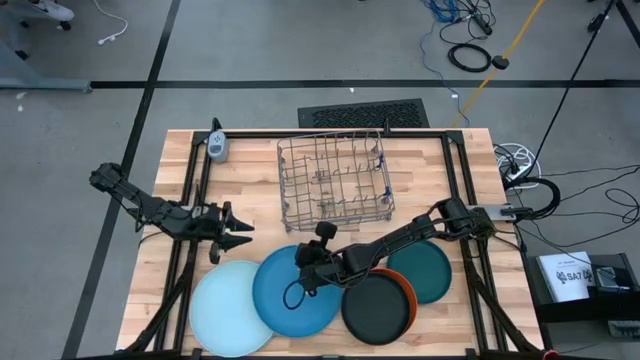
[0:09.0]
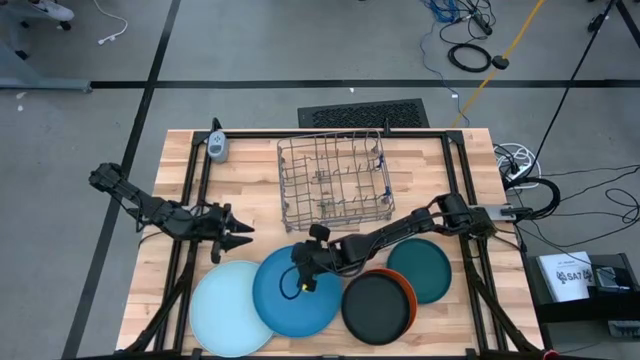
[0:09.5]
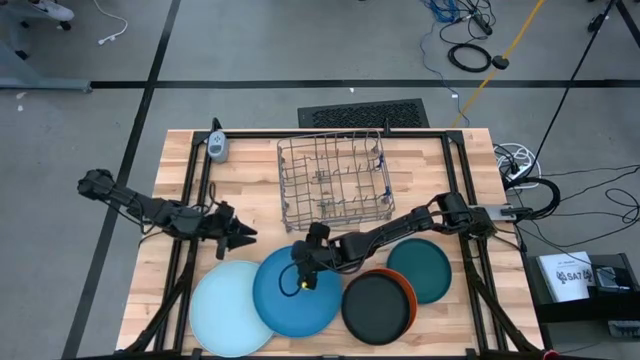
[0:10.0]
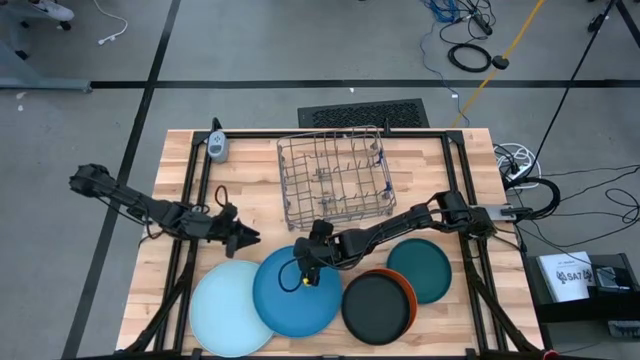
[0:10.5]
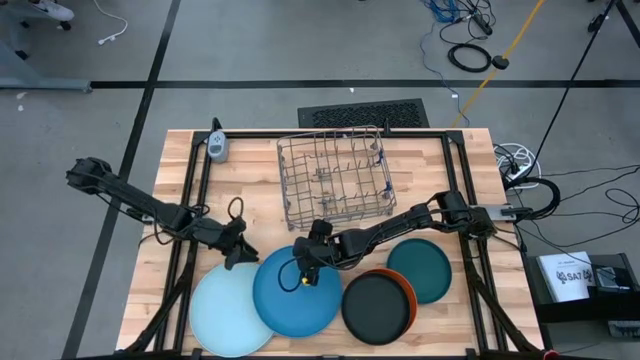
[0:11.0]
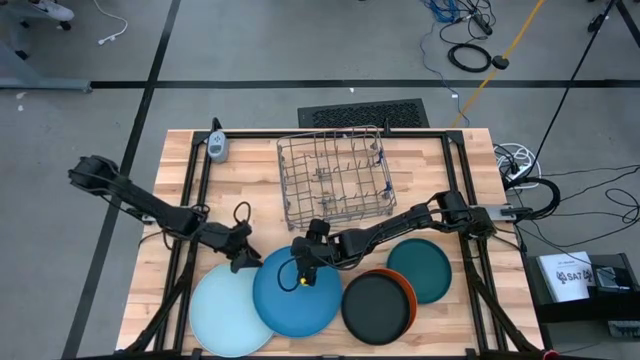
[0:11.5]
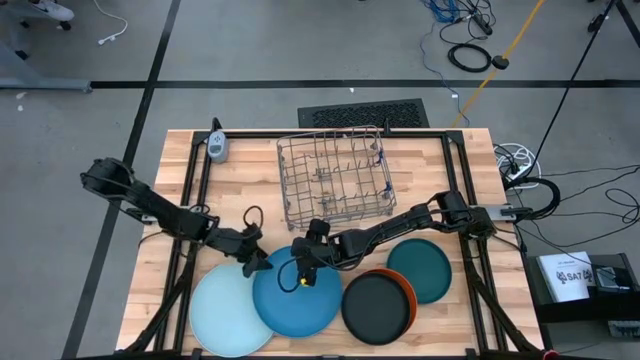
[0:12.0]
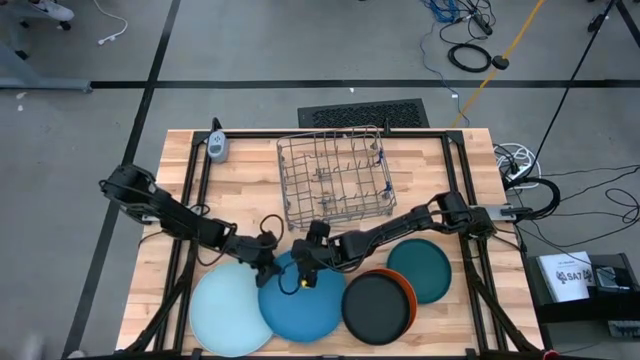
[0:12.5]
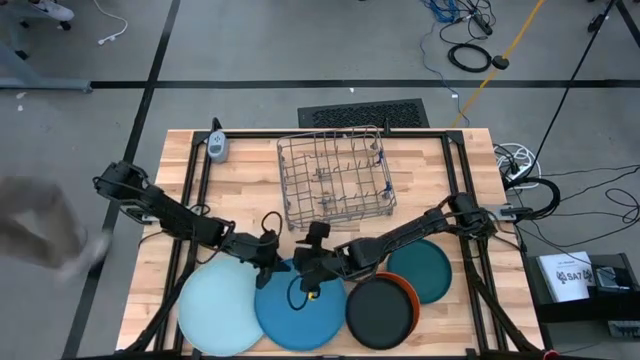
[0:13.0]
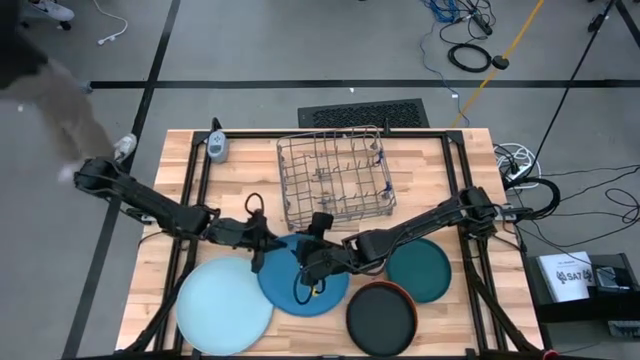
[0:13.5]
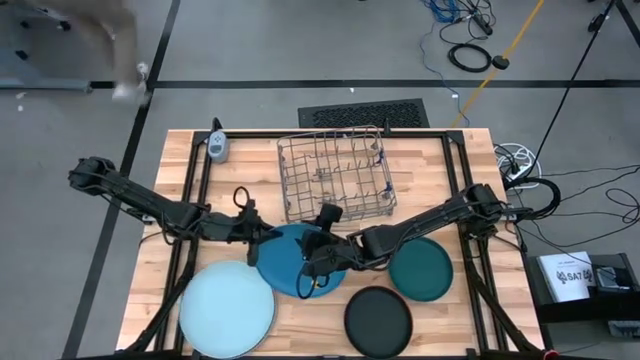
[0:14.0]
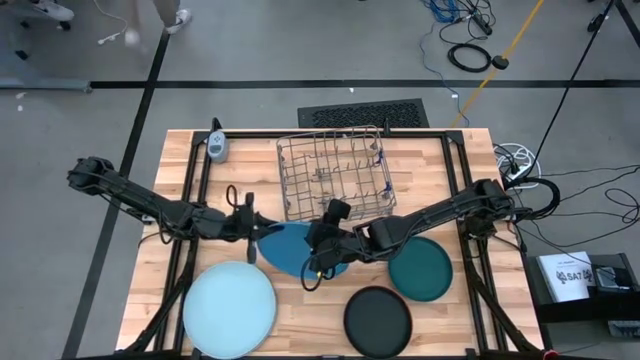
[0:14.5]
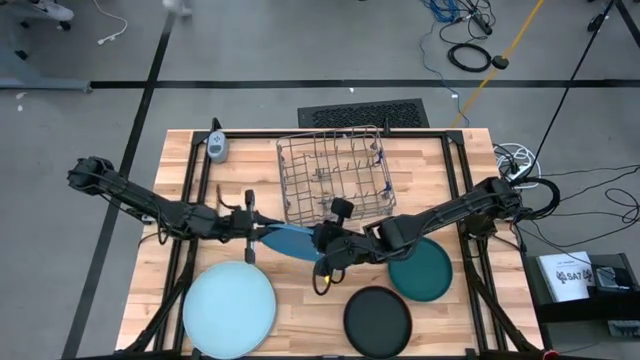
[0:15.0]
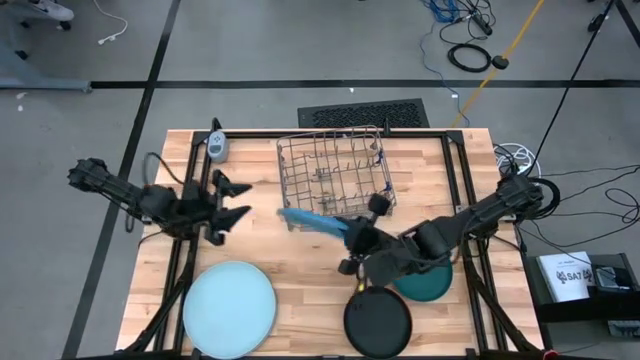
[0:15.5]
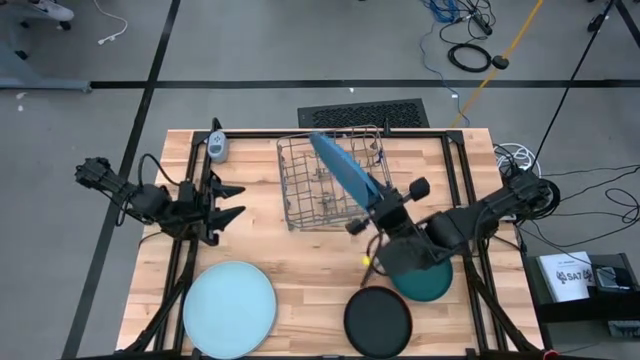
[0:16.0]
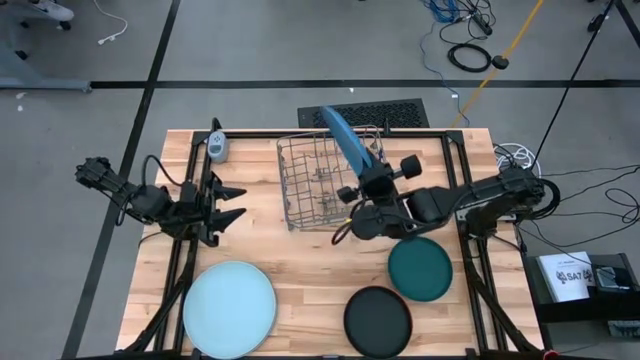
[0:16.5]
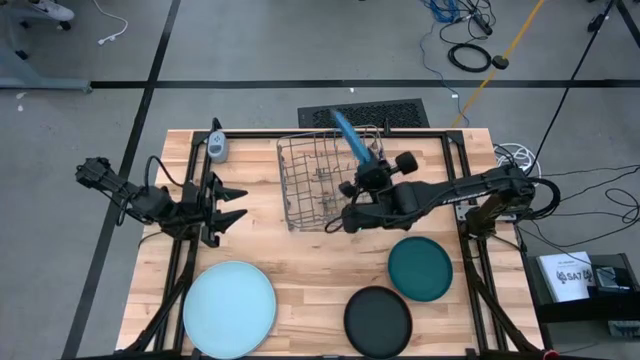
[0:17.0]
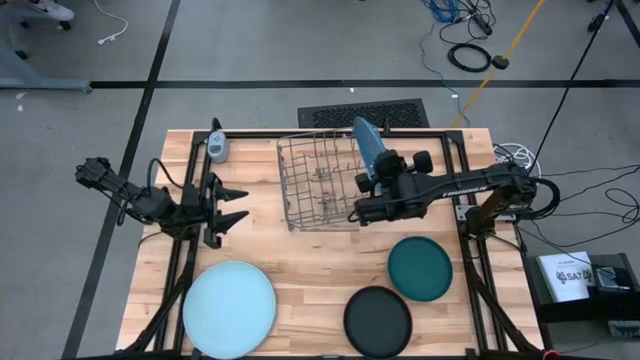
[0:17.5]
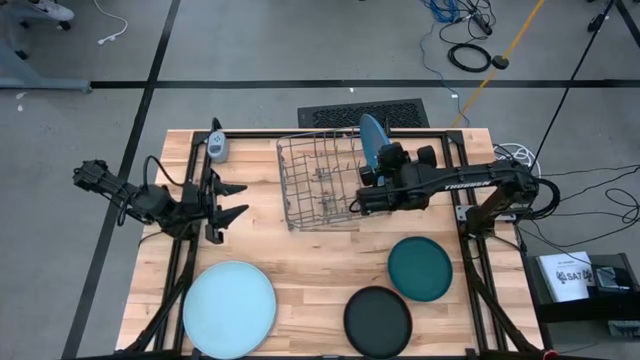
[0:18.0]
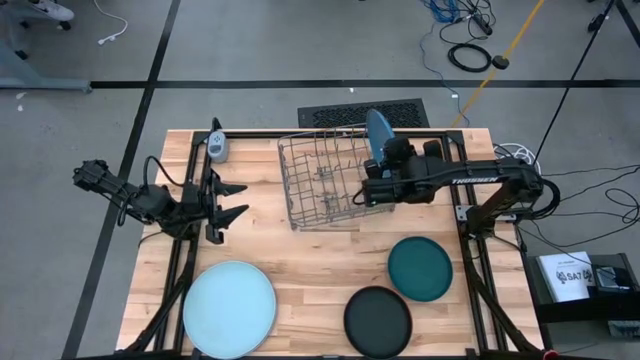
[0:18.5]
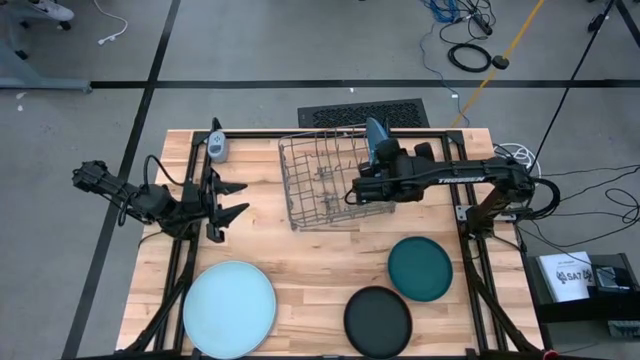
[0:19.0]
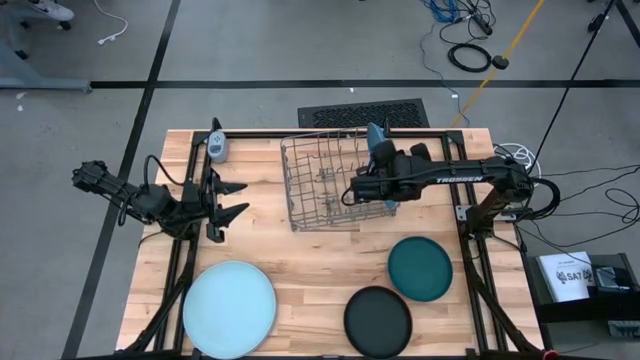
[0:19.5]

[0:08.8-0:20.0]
Task: Sort dishes
Put the blue plate in the dish rack

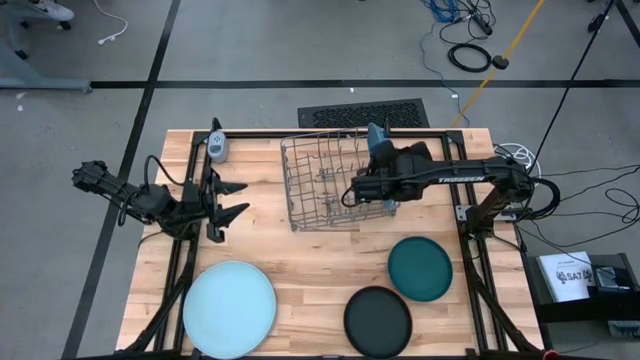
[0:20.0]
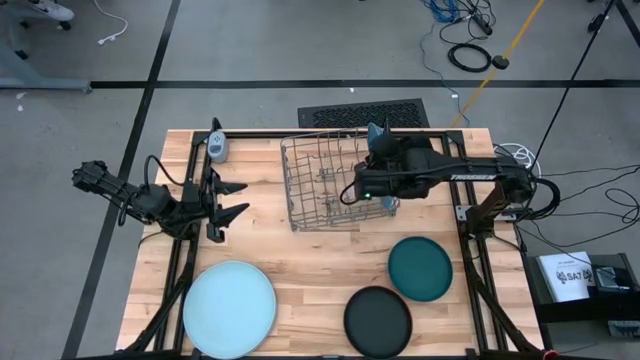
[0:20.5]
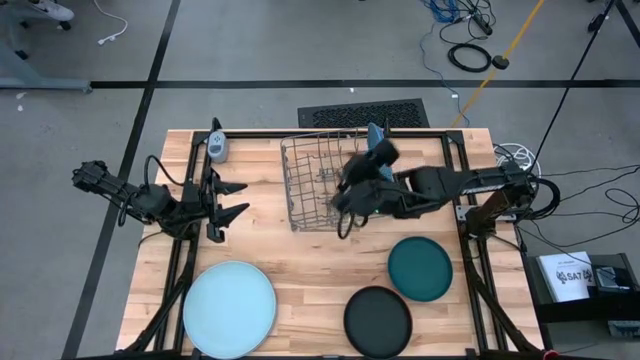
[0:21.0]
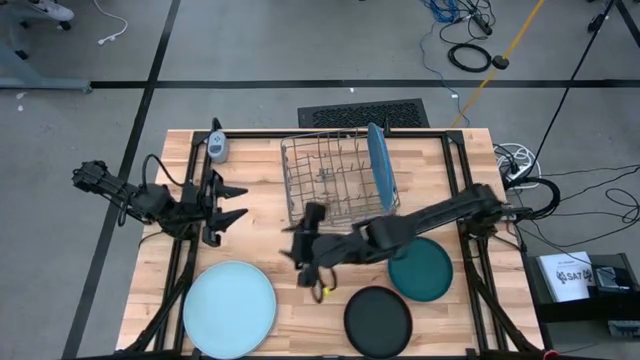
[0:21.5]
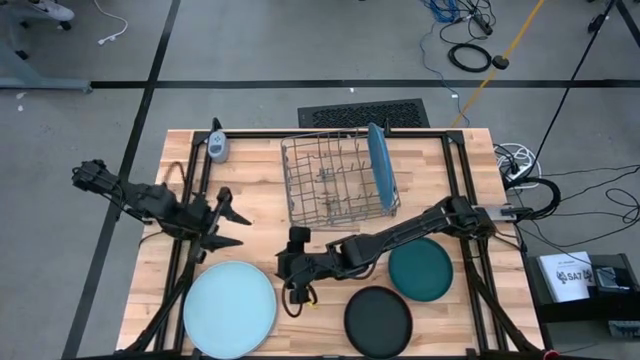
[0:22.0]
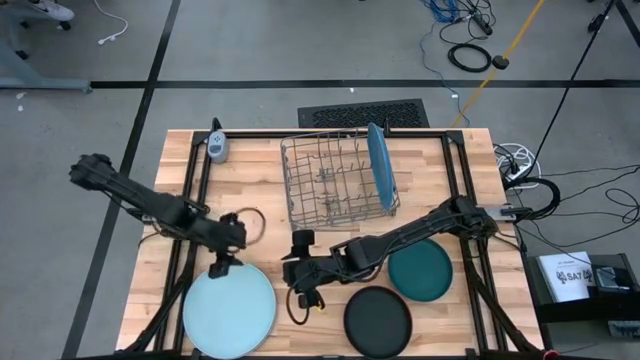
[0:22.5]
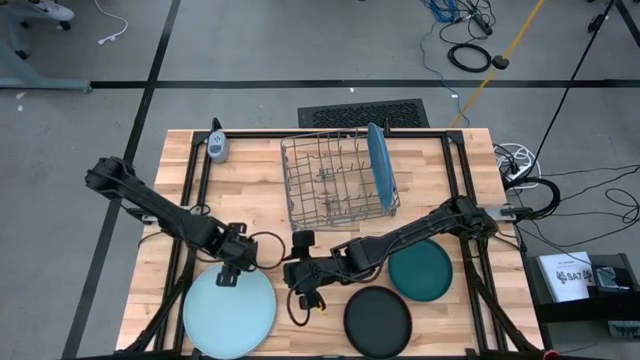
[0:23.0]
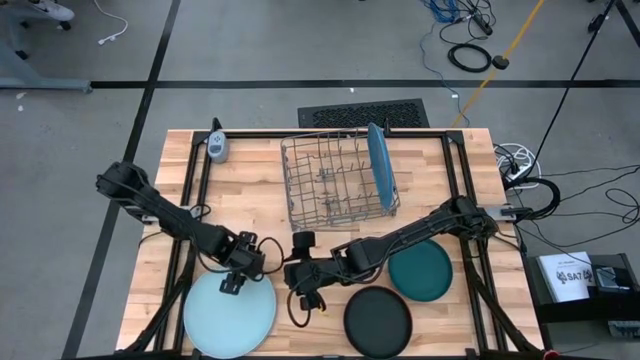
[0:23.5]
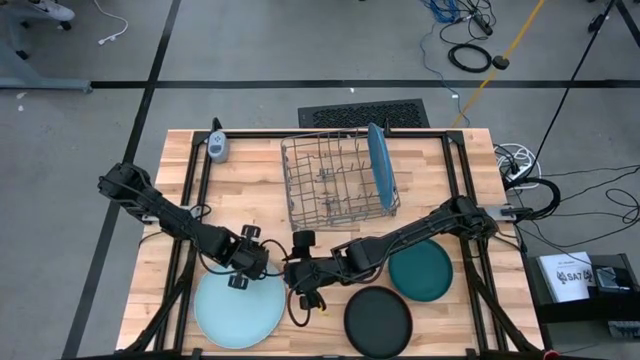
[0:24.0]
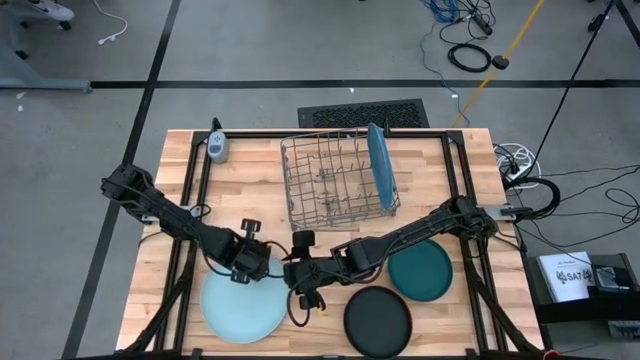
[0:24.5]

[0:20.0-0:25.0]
Put the light blue plate in the dish rack
